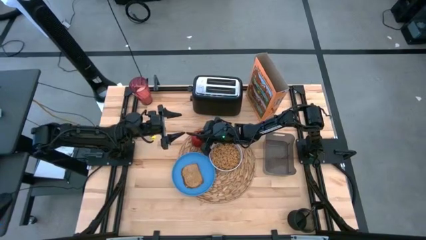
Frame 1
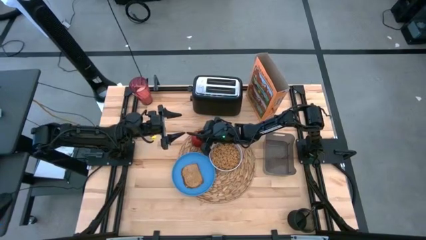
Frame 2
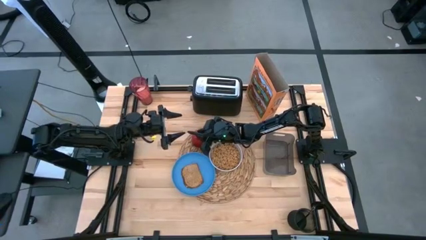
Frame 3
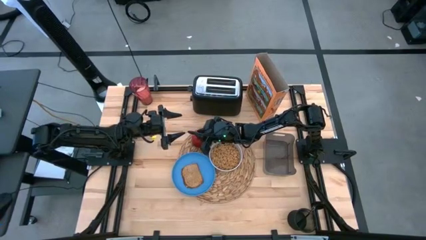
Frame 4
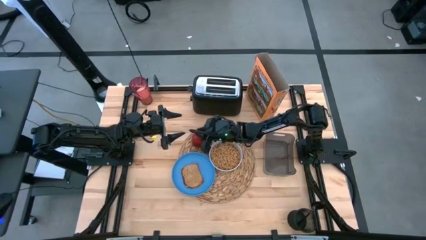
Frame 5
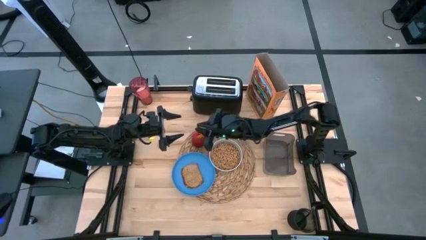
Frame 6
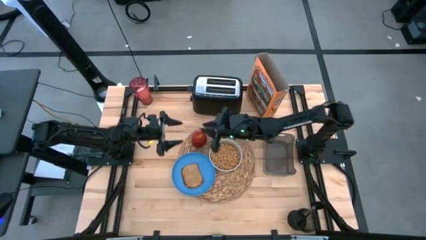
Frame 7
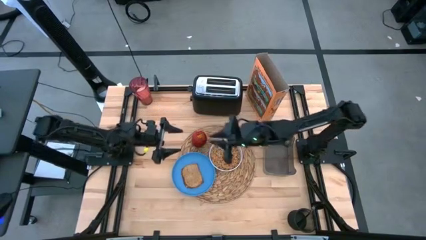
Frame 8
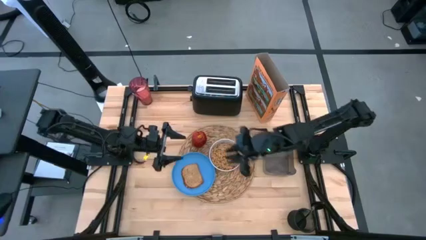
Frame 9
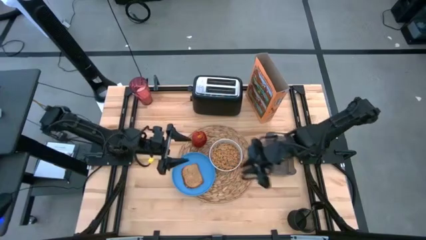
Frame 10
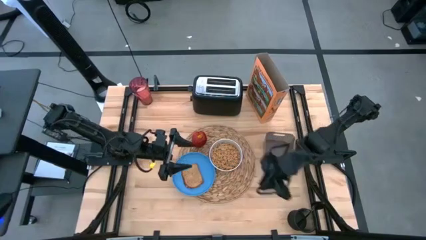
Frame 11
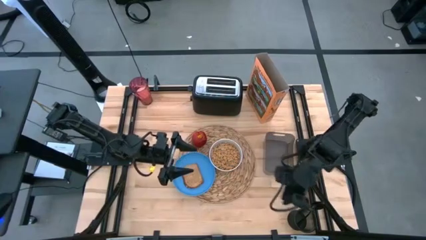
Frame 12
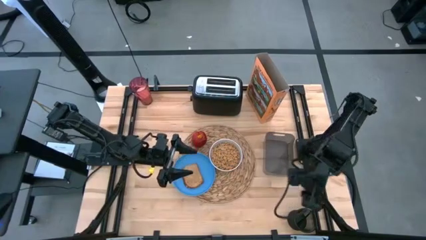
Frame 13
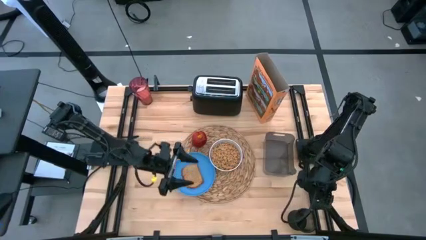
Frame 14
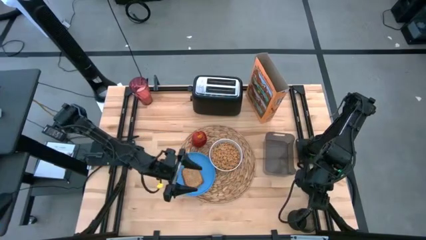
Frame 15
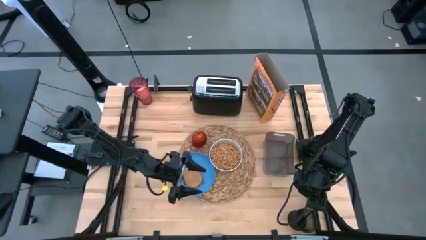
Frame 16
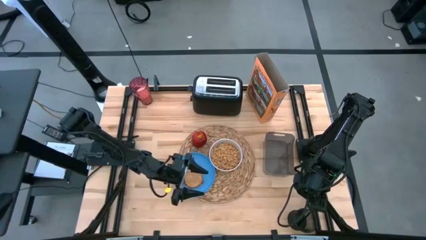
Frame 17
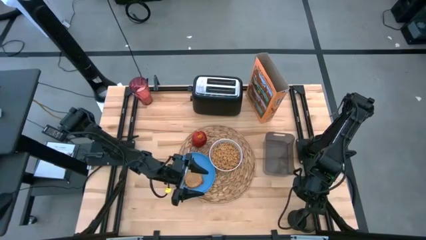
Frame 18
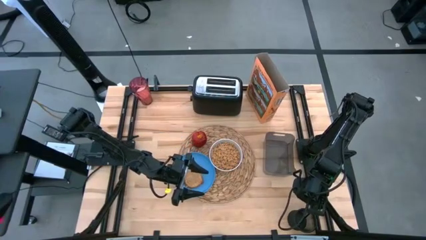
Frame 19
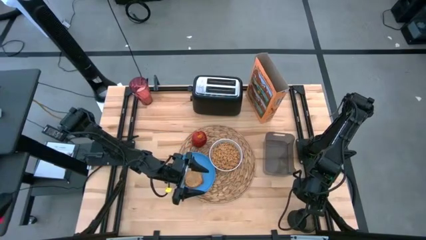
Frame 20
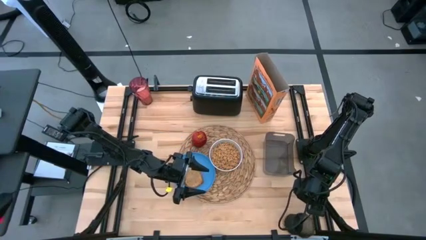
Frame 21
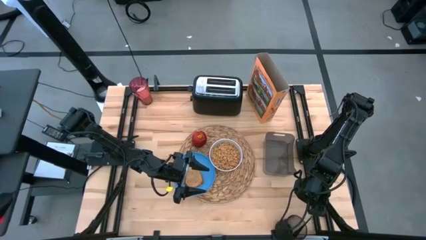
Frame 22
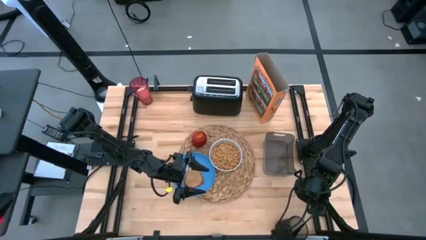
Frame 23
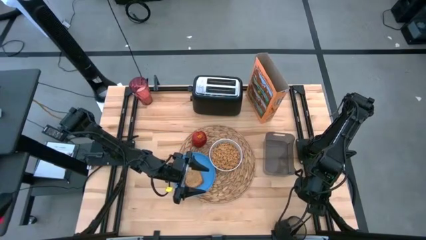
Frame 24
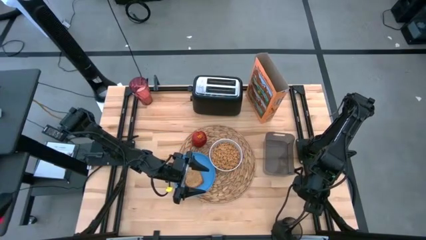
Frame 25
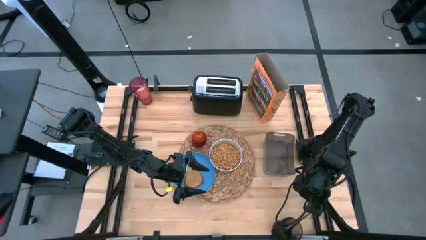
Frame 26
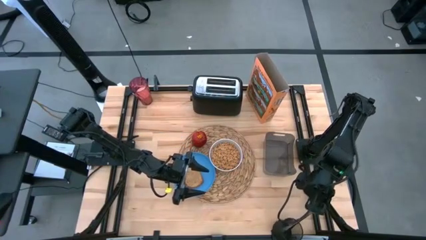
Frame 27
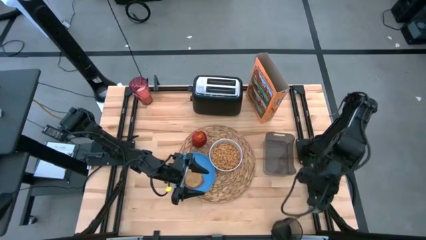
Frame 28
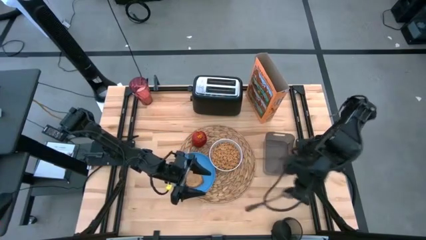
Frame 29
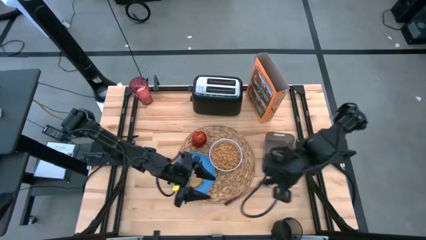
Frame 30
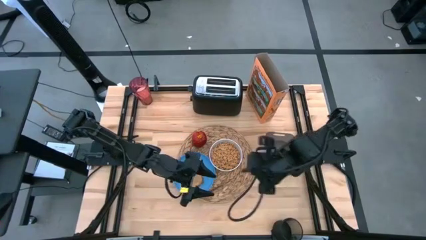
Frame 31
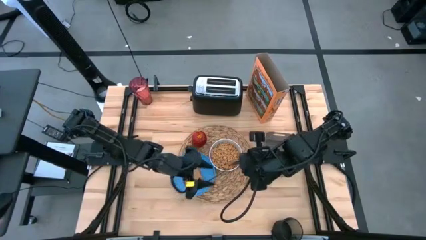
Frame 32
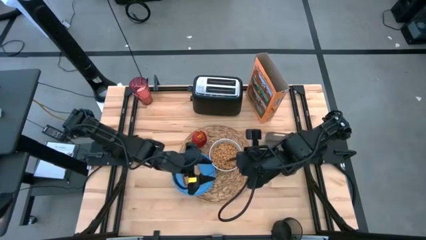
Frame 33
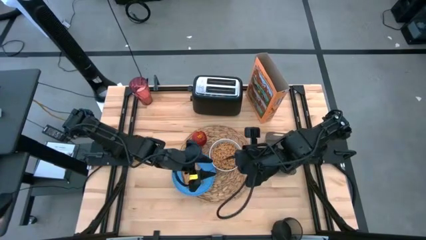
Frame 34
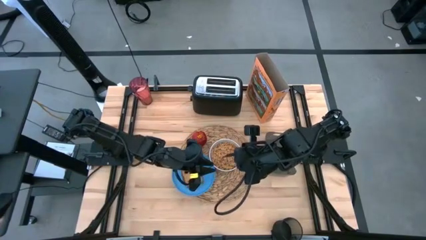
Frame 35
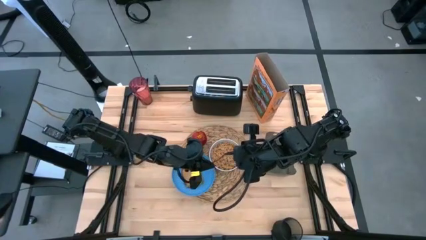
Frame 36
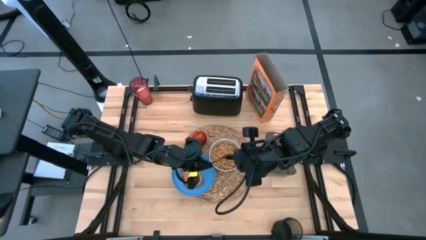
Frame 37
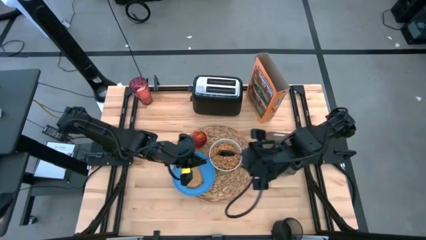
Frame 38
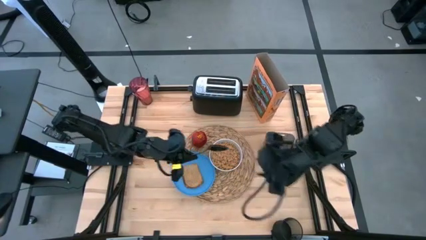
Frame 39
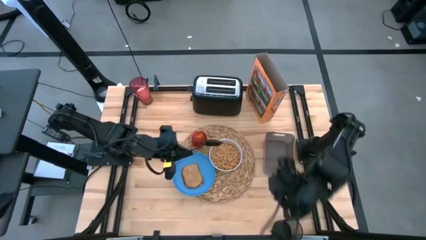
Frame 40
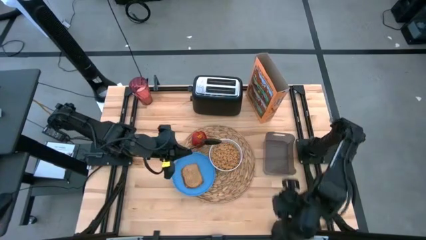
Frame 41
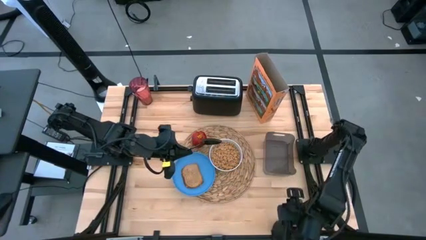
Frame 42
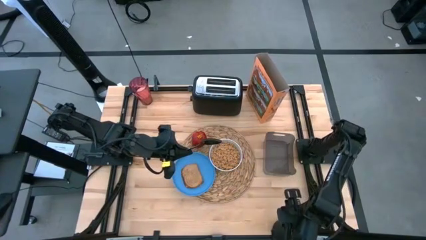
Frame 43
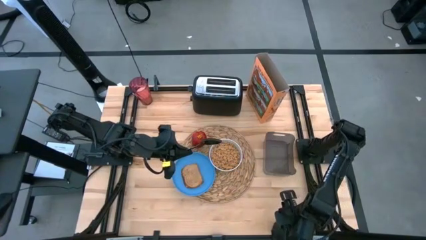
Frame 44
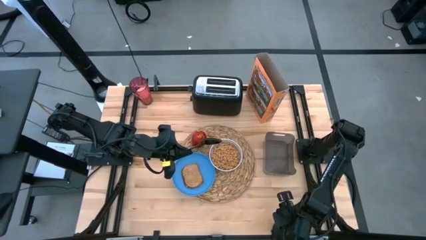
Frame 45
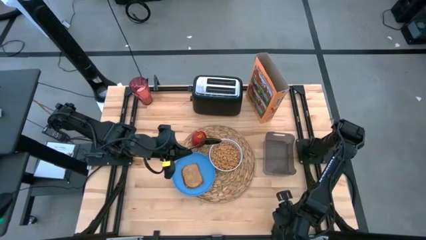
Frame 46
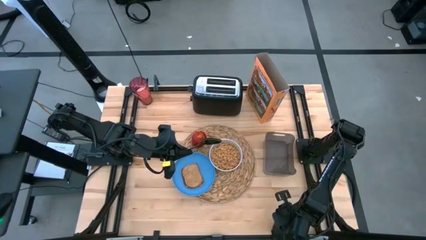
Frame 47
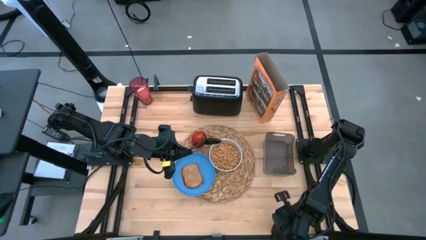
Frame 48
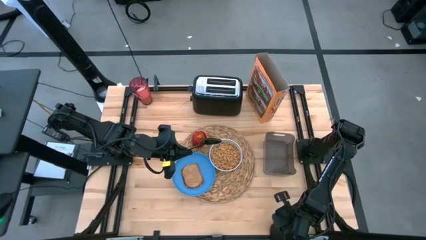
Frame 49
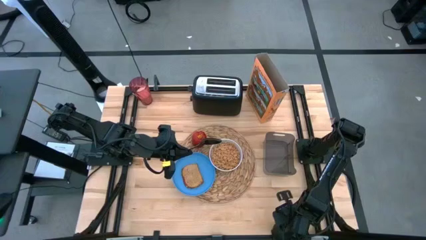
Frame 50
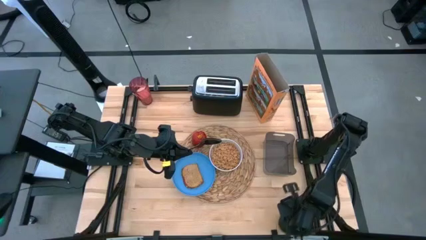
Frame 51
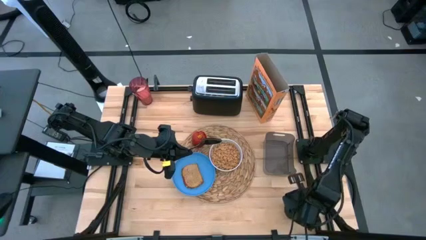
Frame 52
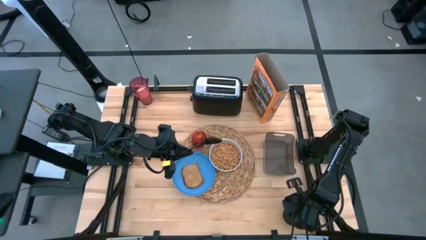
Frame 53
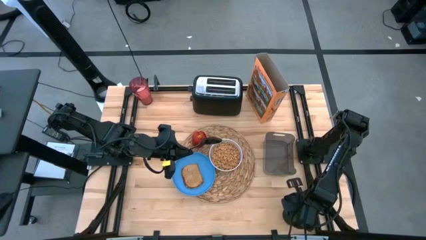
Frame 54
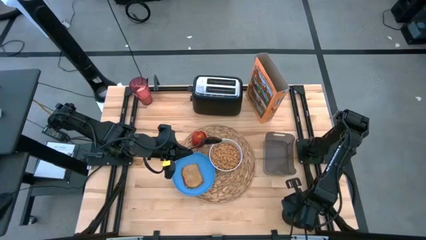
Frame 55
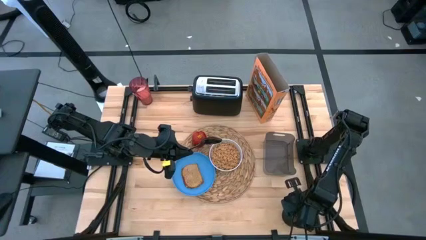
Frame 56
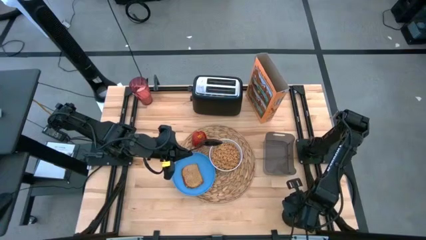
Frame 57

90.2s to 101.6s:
Task: Arrange a breakfast setting
Adjust the black pencil organizer

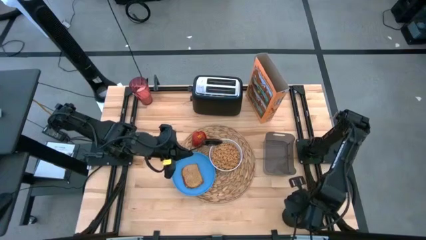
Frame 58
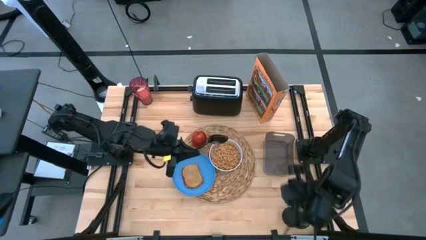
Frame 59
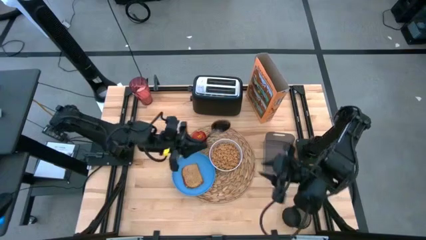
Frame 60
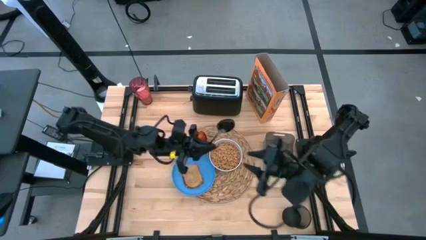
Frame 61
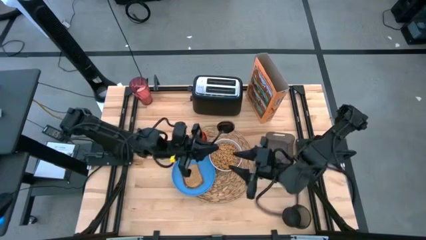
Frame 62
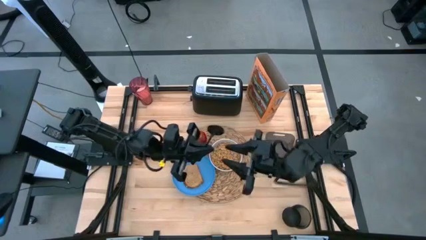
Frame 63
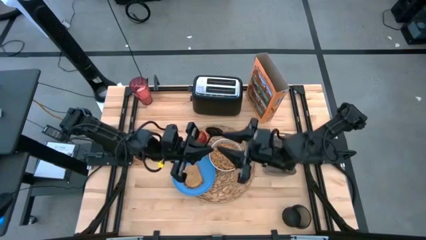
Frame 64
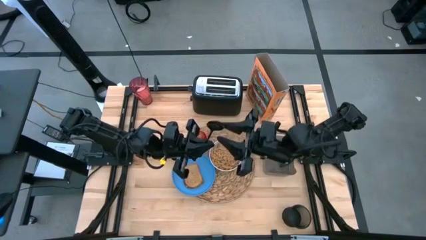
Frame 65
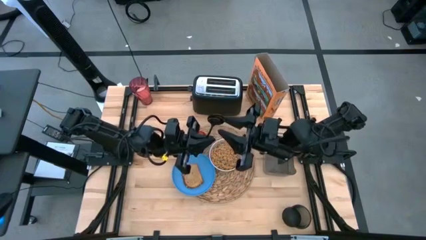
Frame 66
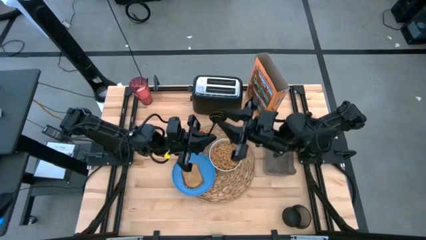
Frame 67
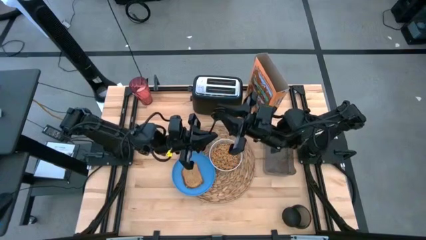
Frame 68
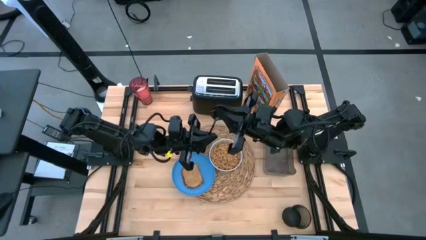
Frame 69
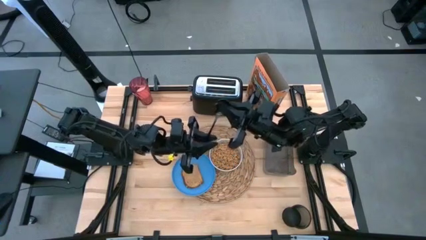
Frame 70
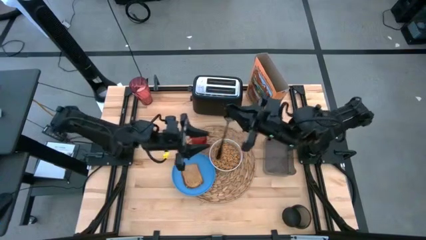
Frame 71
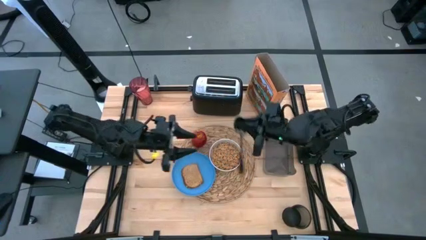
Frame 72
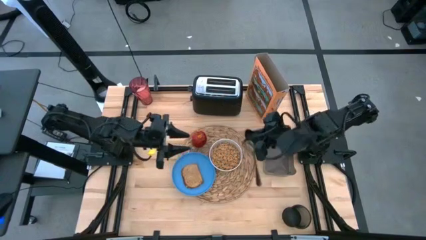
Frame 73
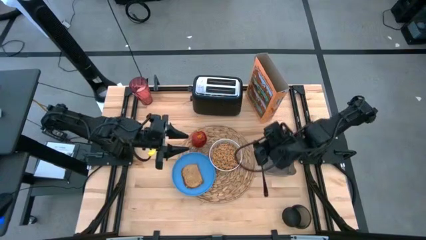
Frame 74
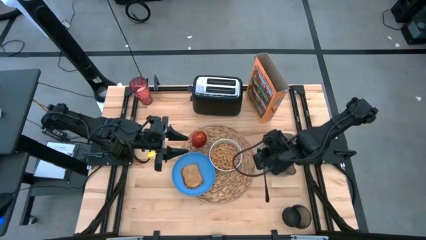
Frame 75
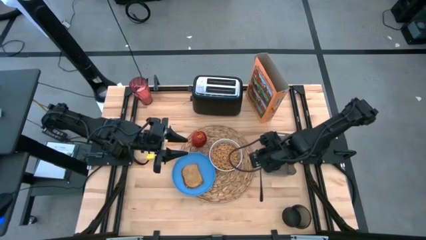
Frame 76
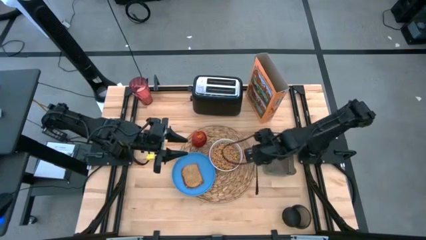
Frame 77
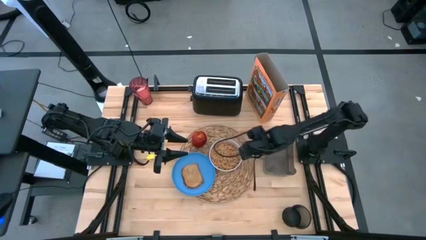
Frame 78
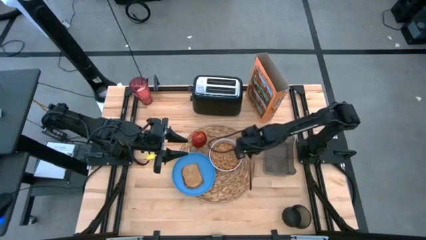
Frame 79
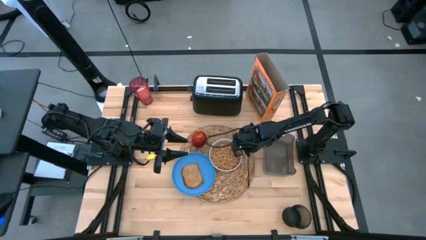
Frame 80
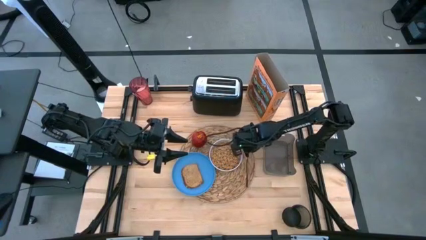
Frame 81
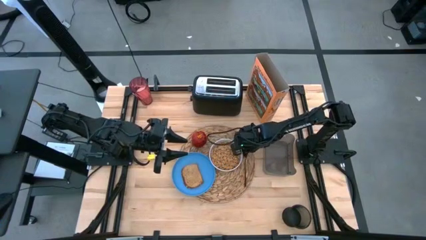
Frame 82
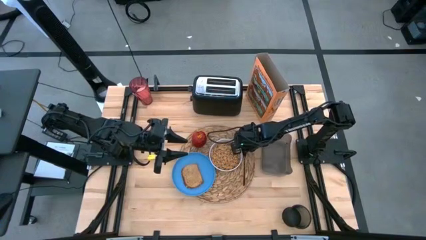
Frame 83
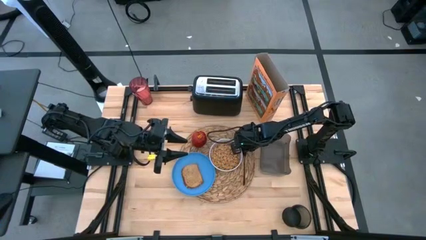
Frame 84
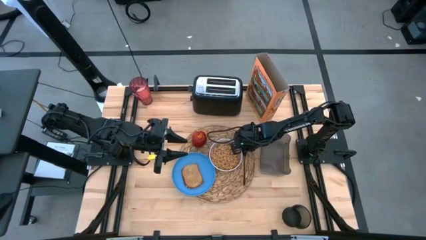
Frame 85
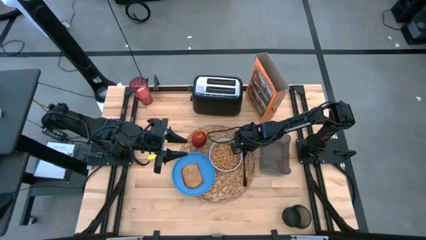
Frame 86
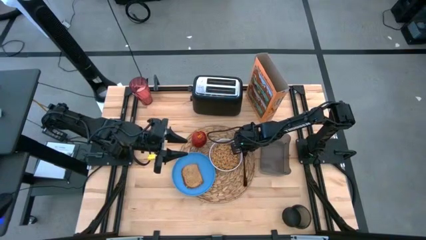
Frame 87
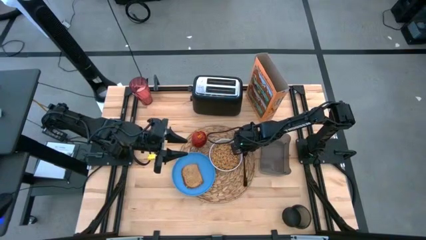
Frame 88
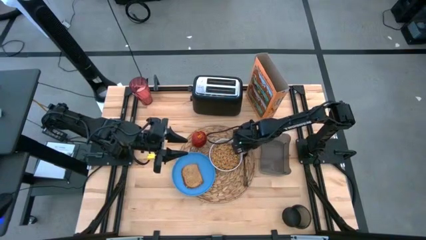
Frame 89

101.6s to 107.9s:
Put the spoon on the right side of the table mat
